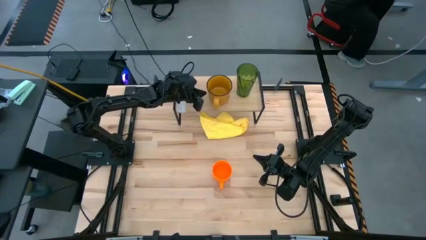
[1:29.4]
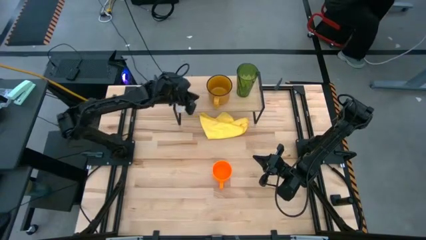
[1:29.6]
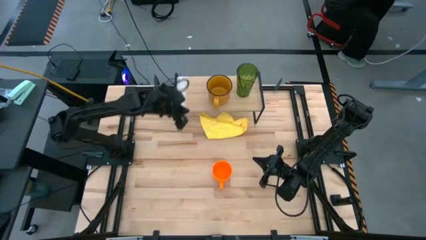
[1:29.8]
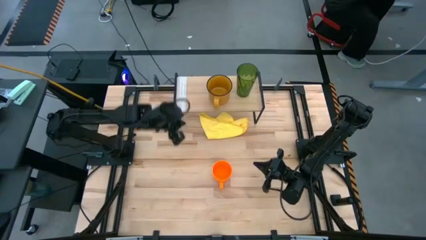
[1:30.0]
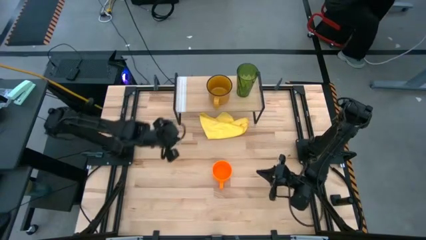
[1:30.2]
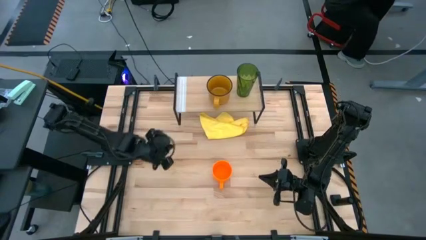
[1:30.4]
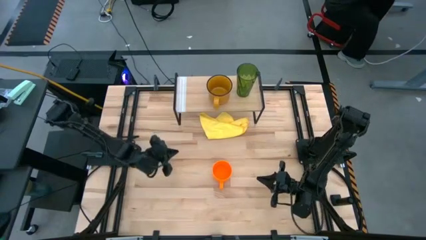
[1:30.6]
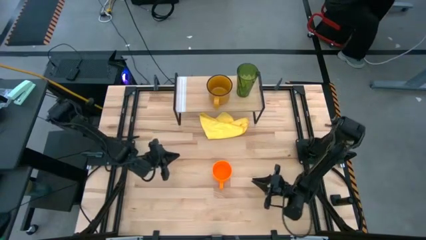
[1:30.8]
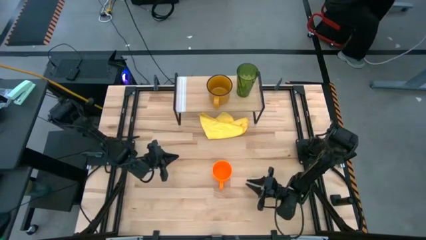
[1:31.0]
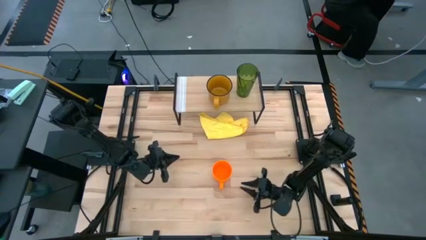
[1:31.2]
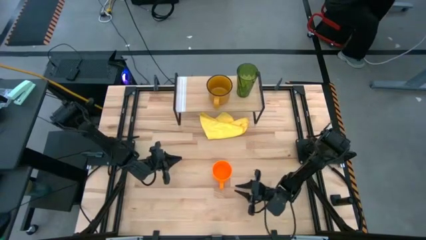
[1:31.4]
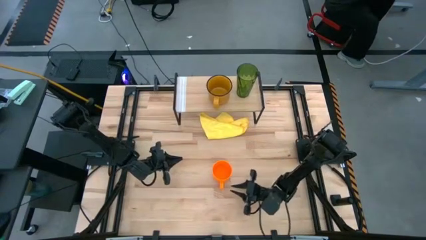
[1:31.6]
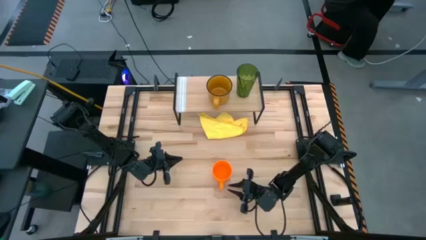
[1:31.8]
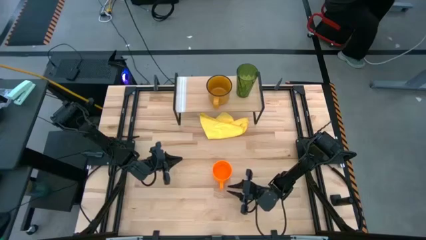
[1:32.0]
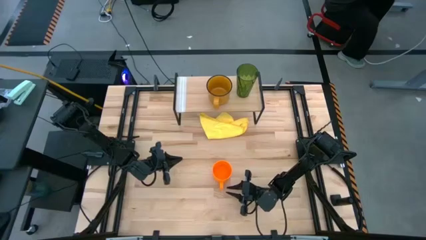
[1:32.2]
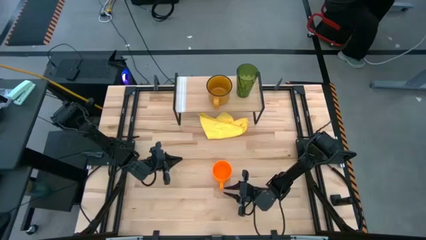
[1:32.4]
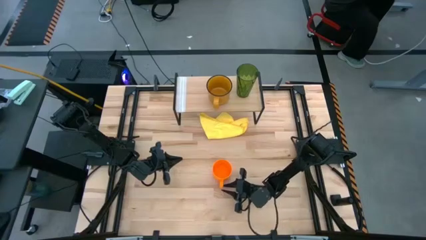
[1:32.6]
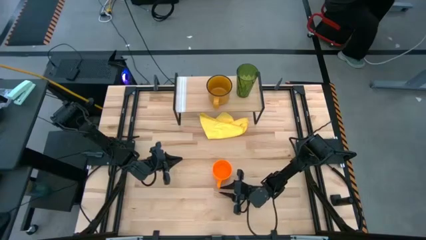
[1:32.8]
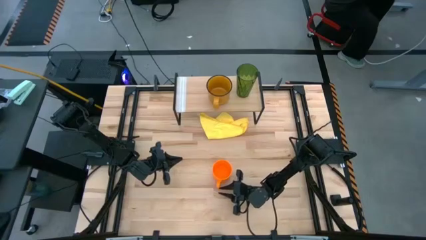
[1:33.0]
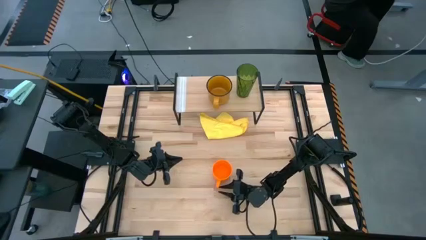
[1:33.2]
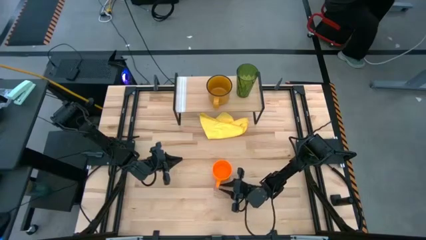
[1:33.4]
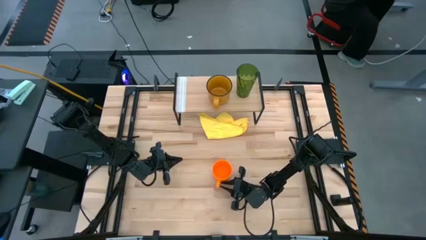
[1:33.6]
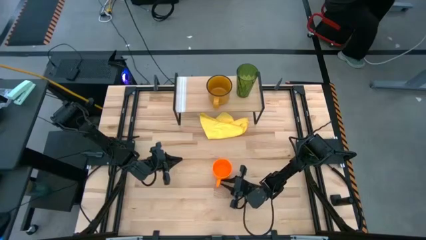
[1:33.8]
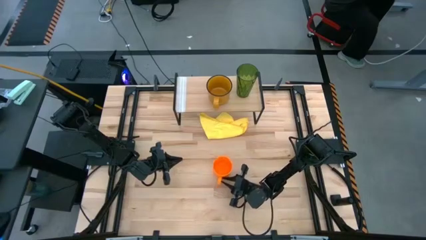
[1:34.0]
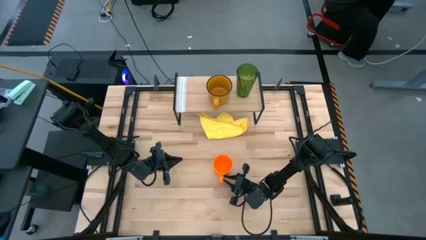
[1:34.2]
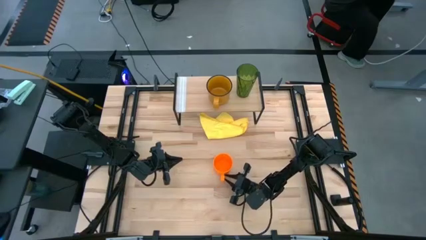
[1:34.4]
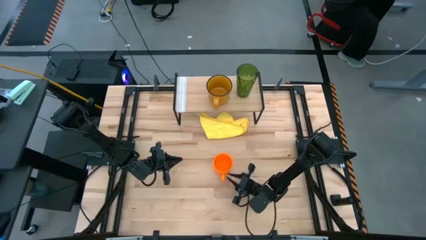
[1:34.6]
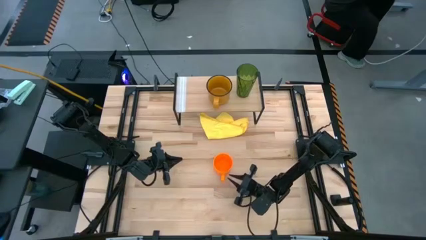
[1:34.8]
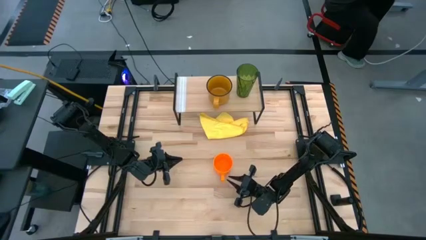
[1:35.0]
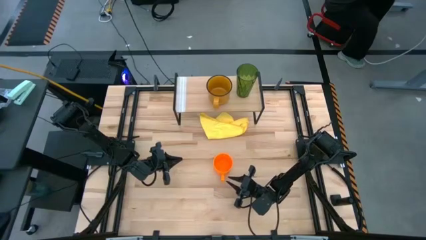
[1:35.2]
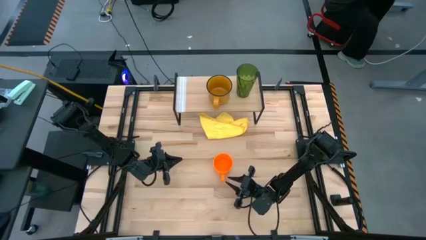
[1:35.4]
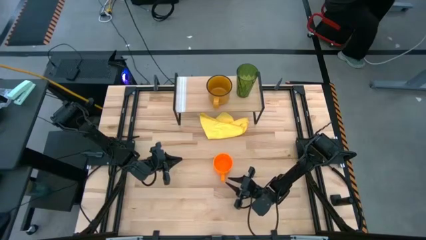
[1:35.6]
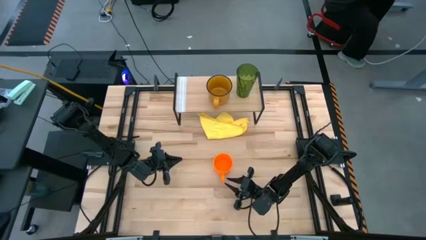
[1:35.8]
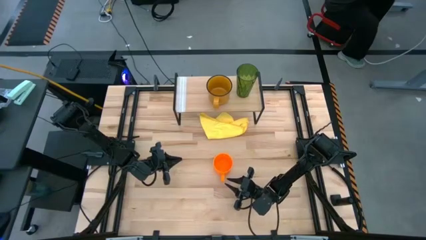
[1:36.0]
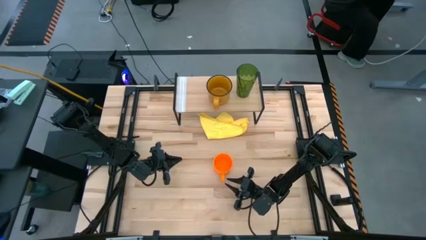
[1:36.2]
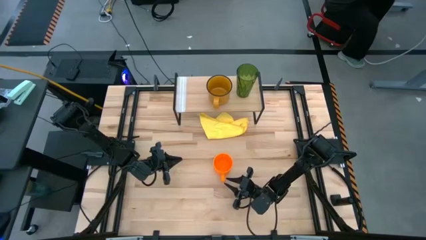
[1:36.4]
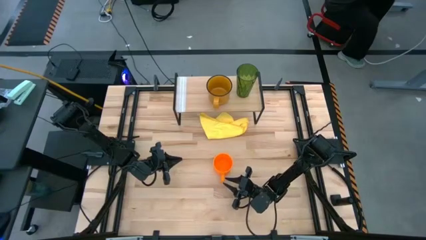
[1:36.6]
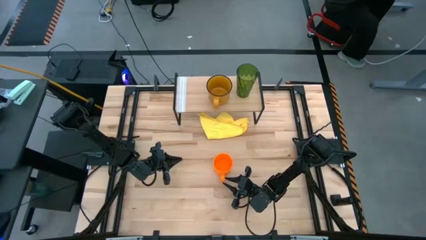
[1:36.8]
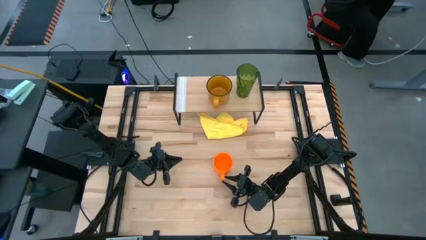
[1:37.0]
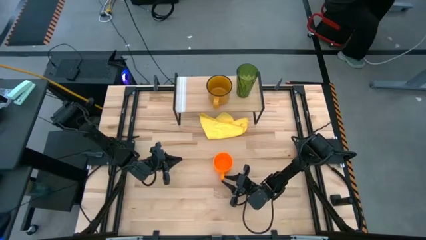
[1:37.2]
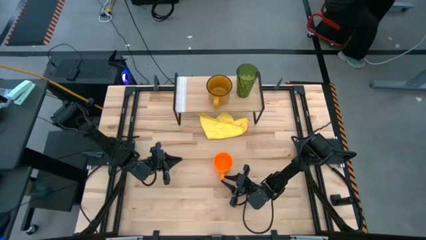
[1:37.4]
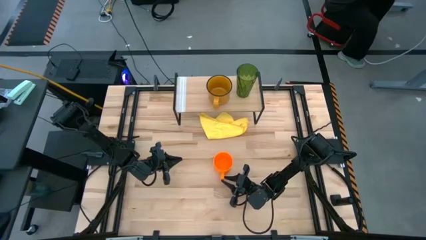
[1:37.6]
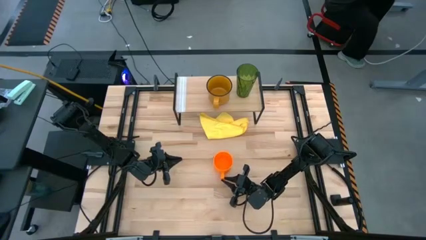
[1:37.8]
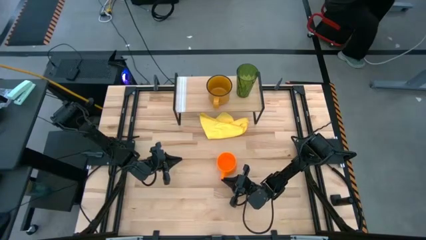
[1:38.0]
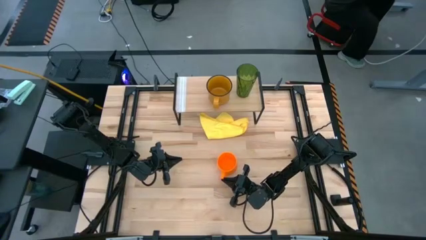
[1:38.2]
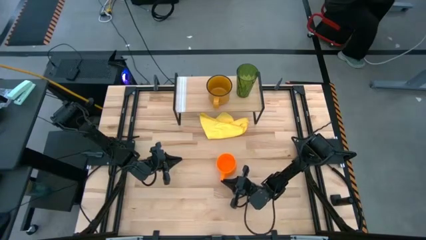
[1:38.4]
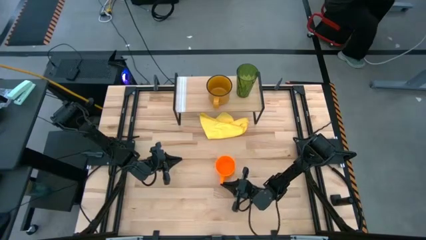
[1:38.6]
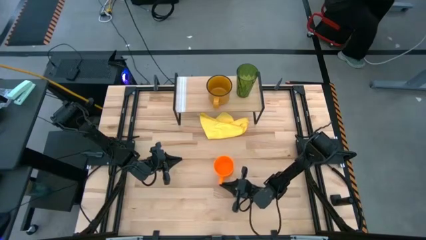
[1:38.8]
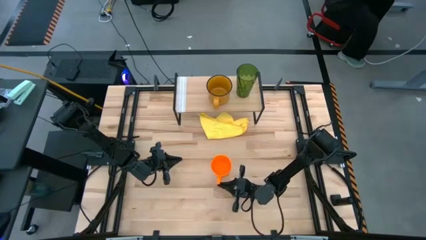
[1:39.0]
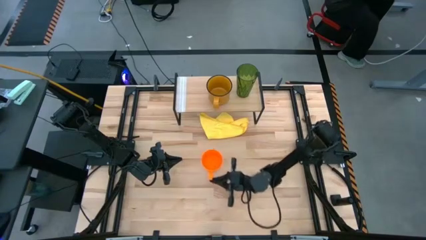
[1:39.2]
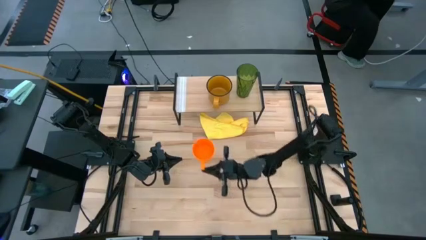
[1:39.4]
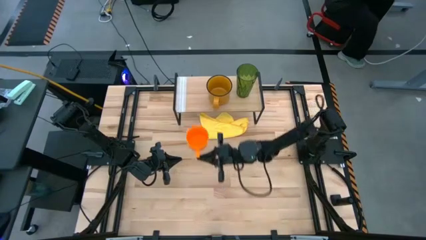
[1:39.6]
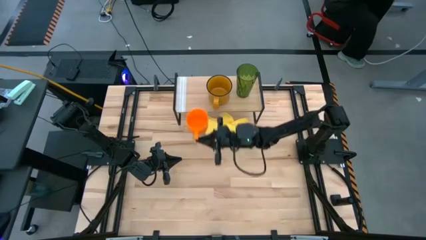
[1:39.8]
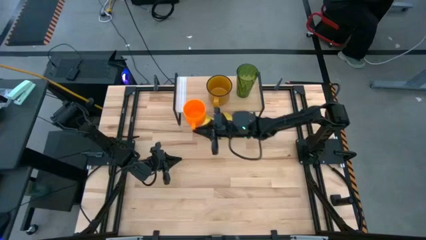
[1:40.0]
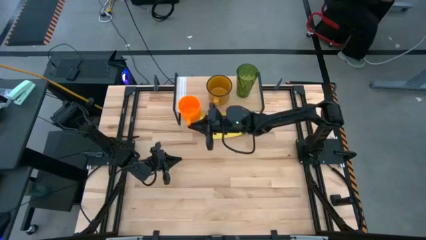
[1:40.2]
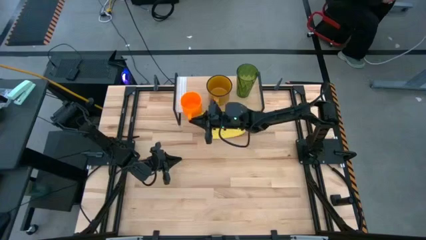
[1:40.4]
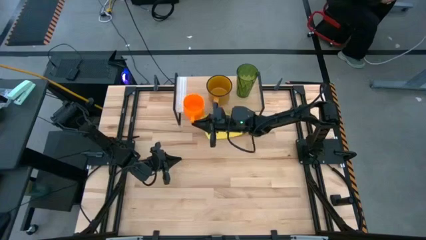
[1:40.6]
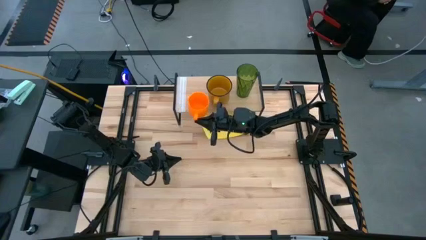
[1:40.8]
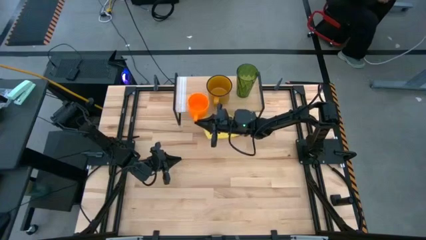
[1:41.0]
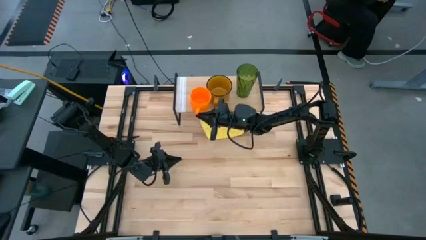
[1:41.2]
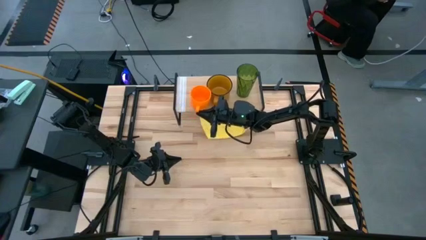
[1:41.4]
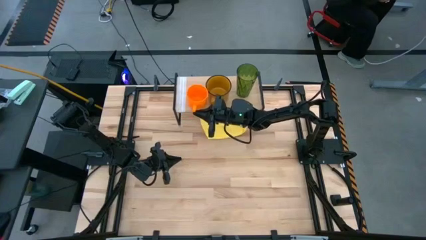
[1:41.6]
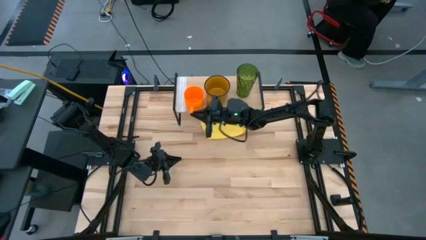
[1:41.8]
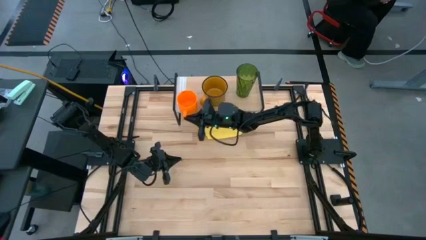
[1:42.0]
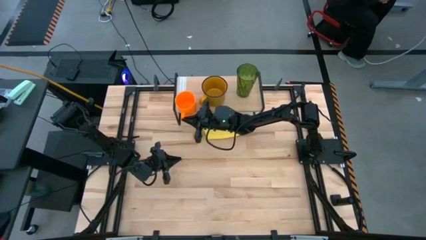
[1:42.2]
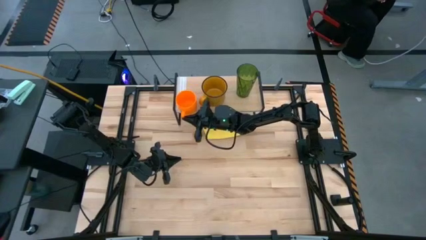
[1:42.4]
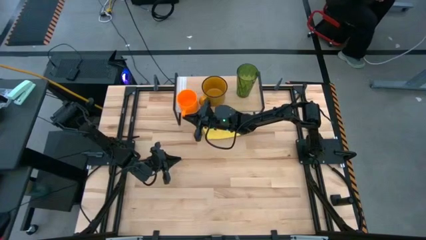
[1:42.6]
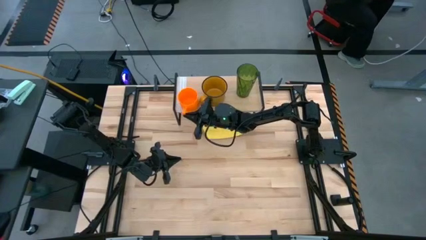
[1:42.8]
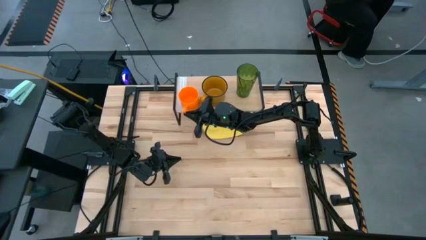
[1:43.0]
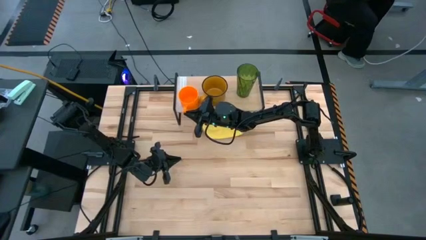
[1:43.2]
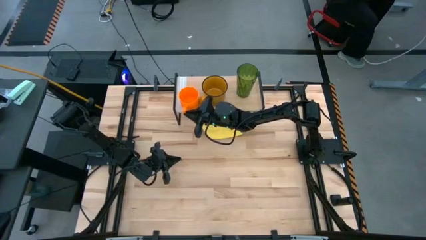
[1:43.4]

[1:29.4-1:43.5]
Task: Stack small to large cups/mugs on shelf
Put the orange mug on the shelf
